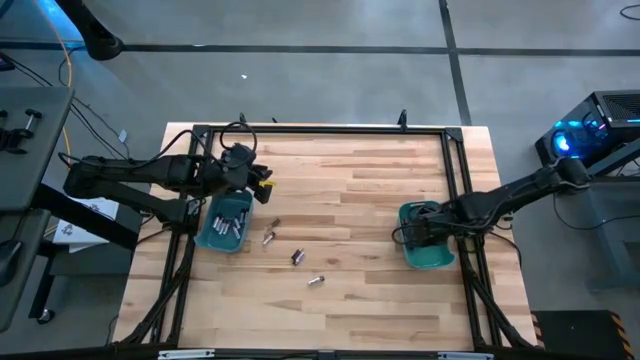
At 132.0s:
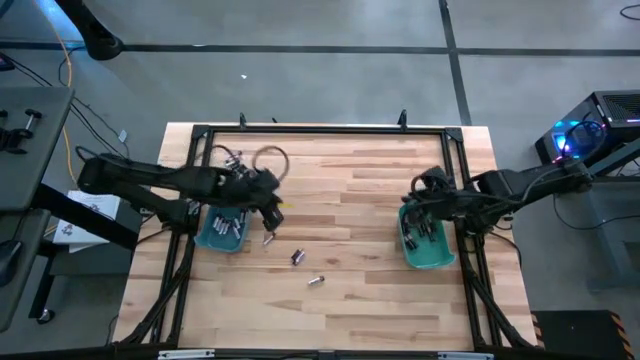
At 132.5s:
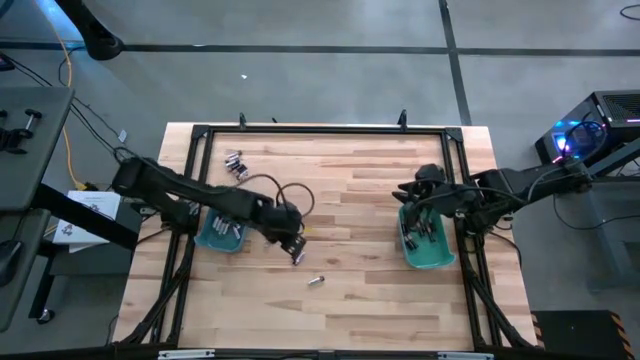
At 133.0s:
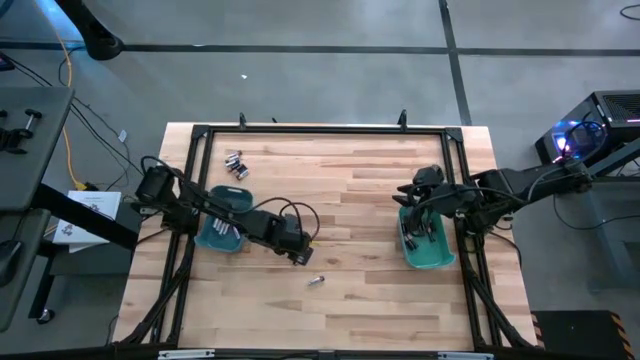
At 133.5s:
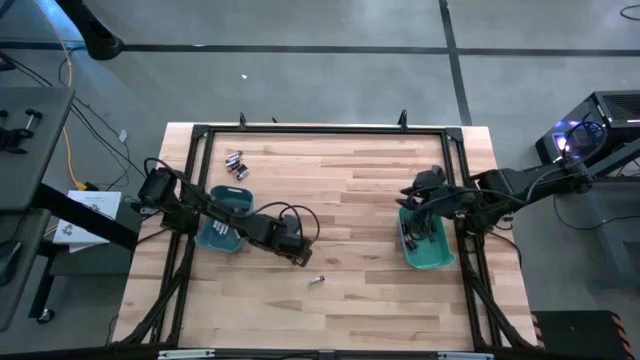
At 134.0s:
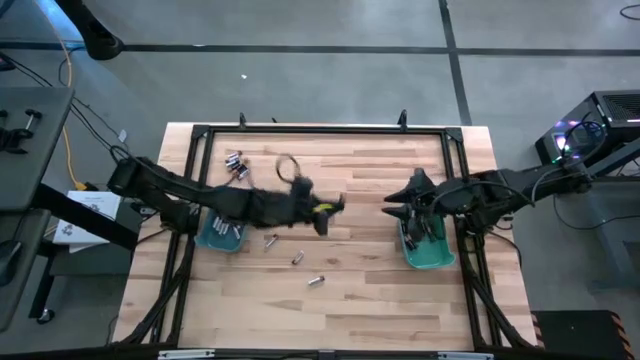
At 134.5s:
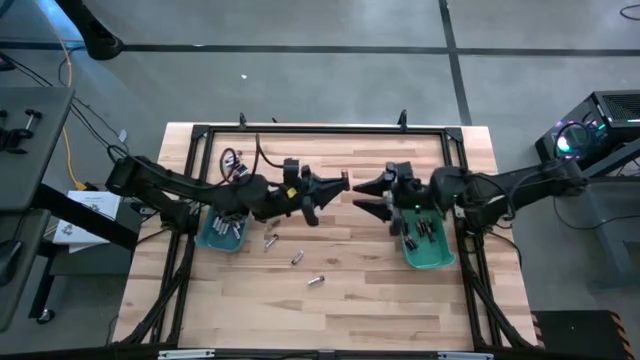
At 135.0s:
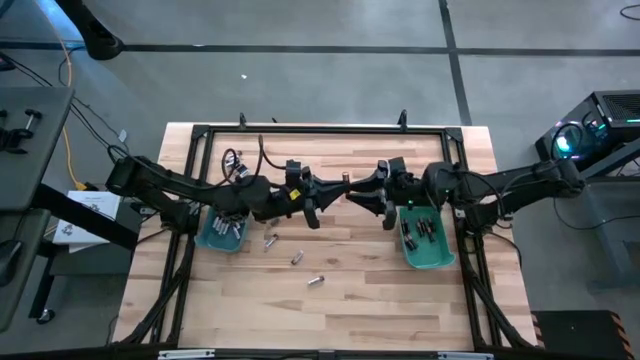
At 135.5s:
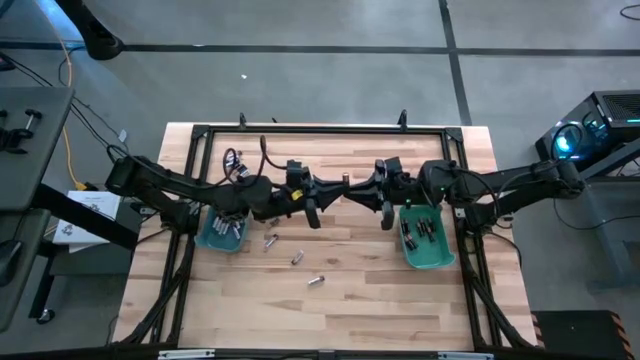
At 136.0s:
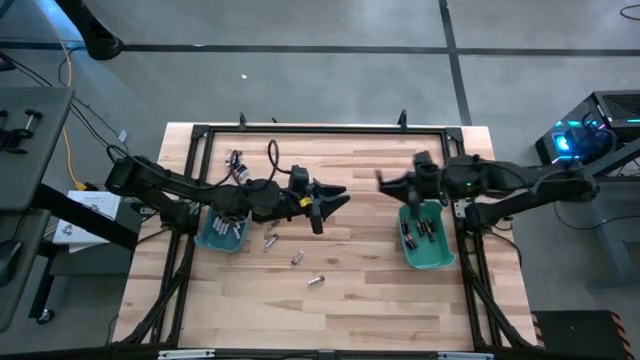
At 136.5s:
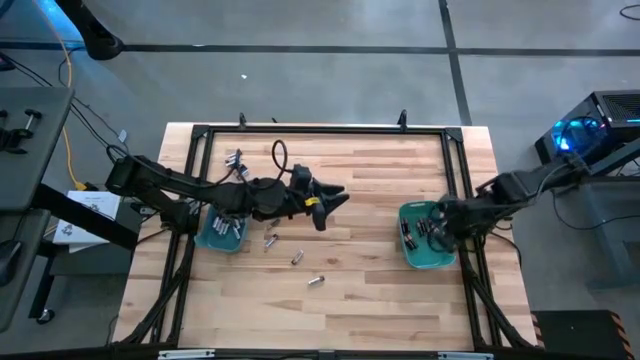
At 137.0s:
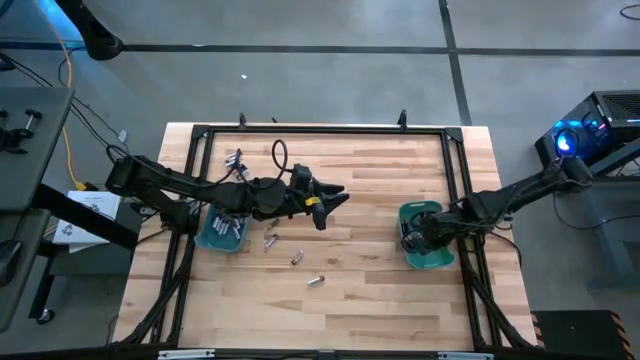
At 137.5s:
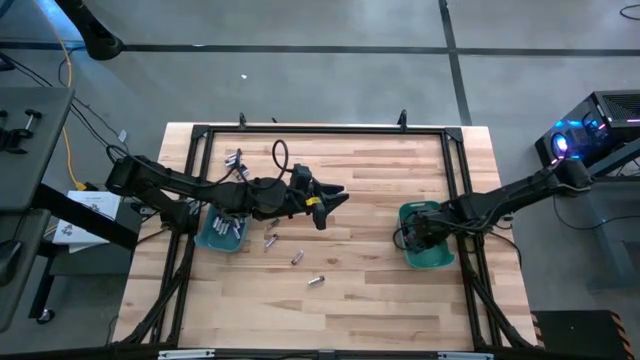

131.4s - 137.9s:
Task: Sort batteries
Put the black battery into the green bin

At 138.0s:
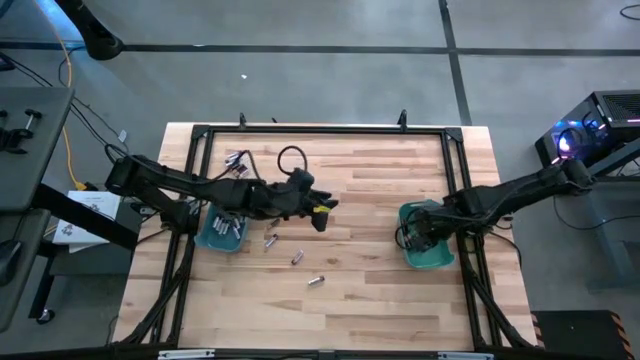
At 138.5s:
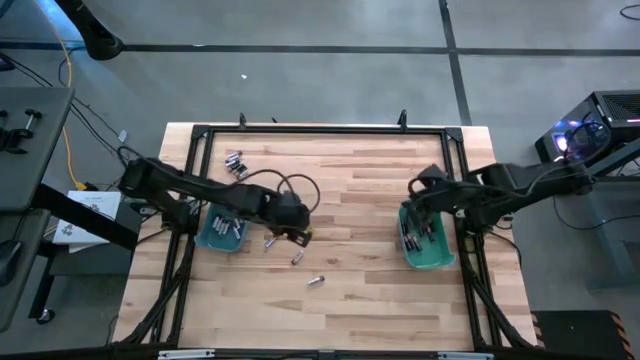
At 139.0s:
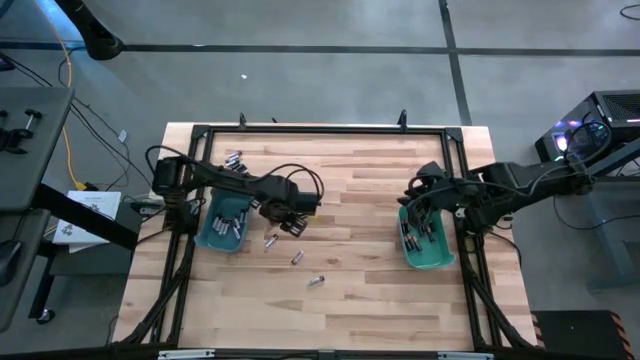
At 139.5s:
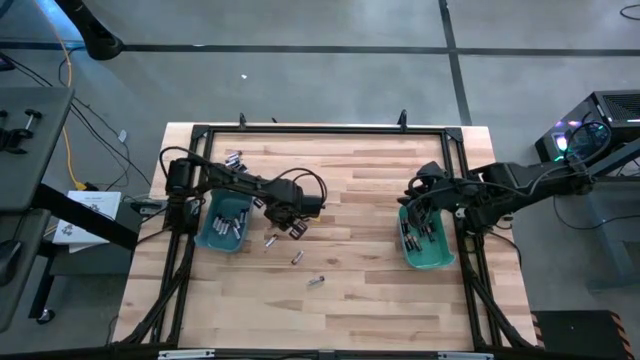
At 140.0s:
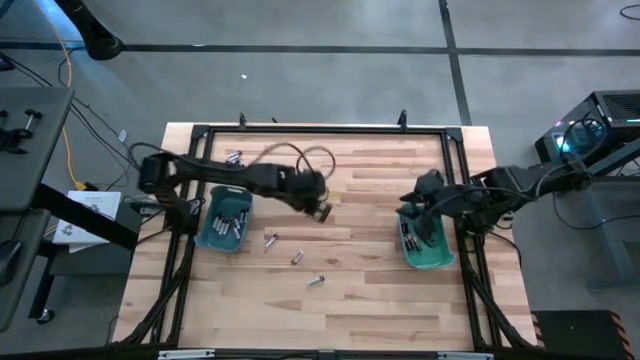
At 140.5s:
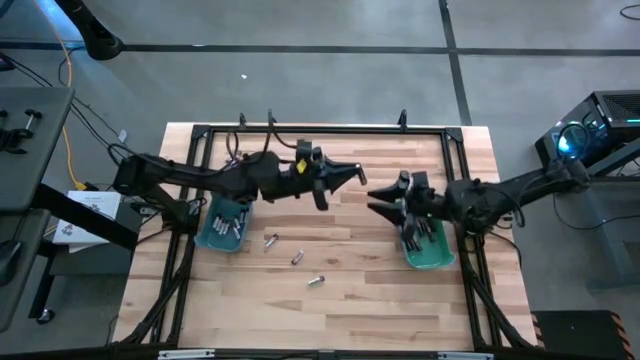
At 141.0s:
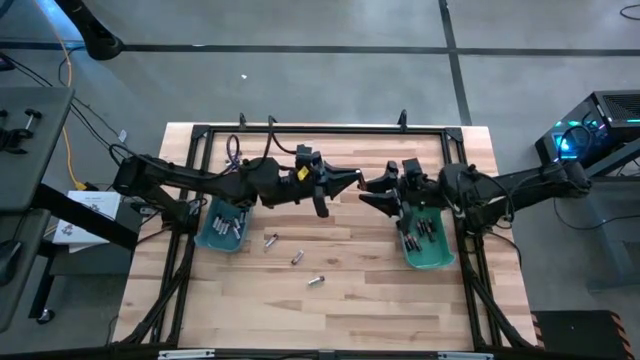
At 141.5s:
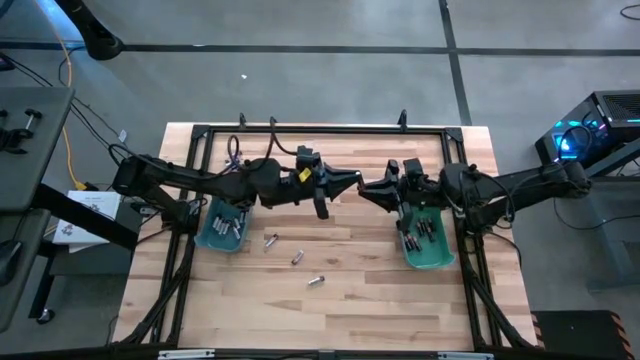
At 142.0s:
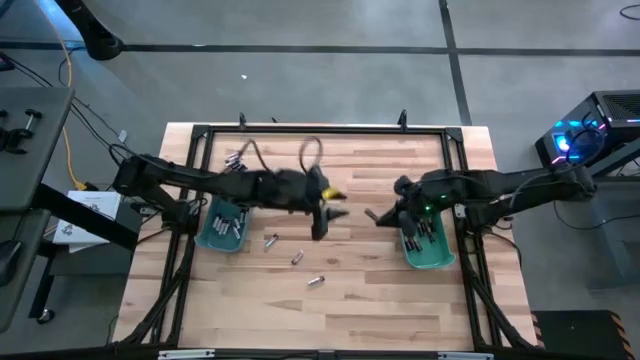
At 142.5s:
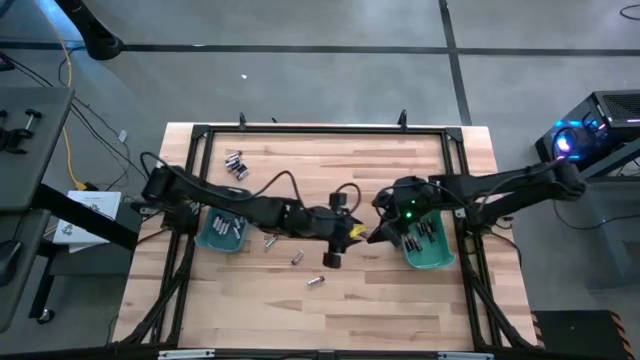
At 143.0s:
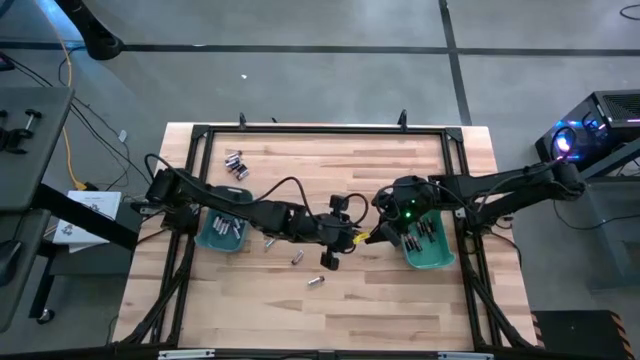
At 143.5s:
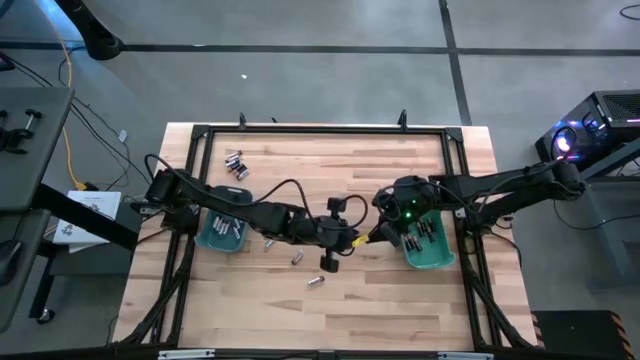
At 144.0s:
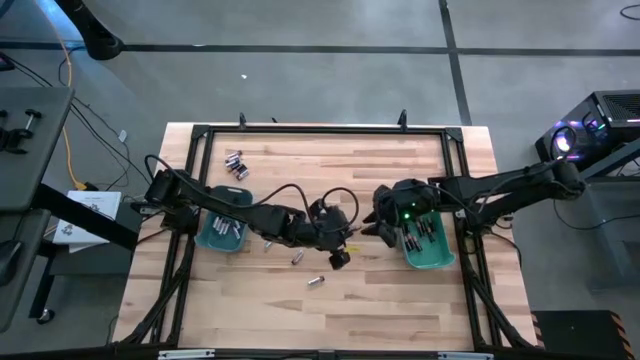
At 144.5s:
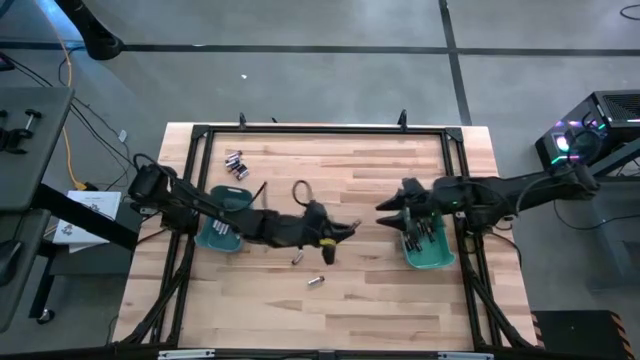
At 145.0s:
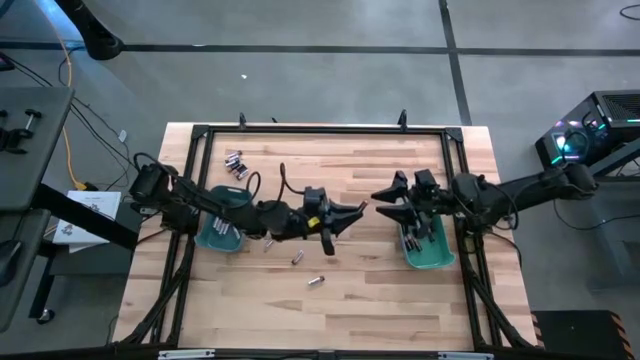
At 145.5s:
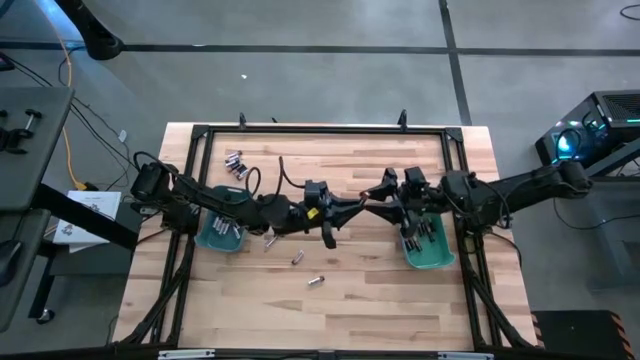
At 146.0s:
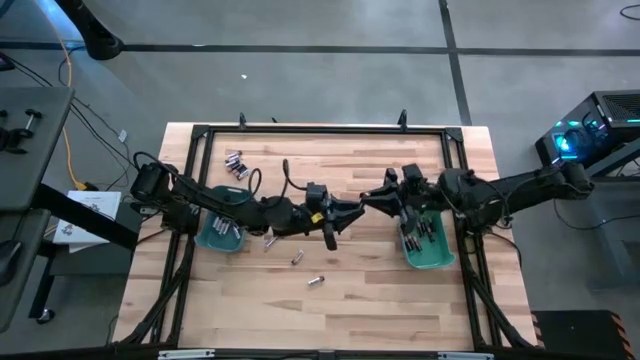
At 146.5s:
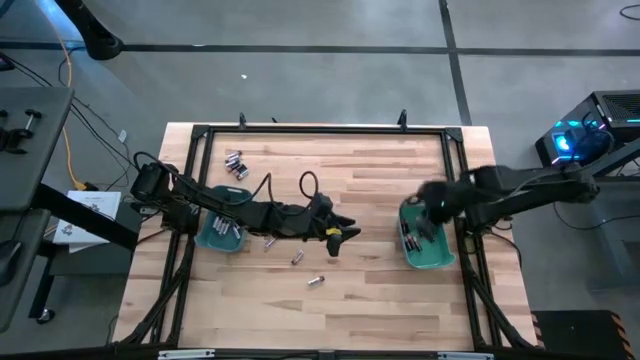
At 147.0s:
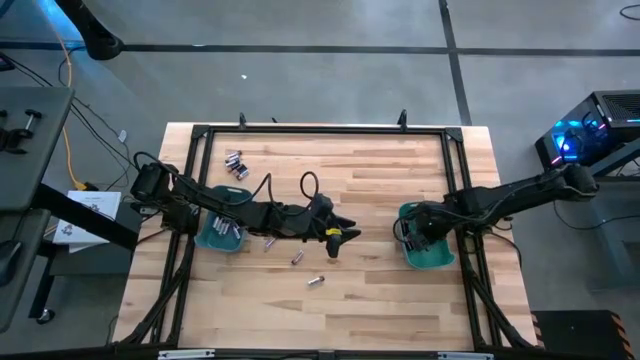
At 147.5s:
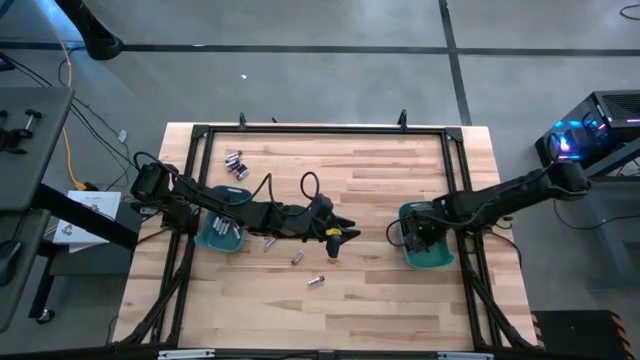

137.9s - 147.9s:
Put the black battery into the green bin

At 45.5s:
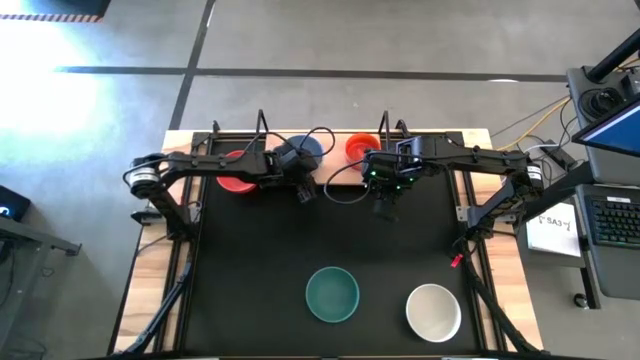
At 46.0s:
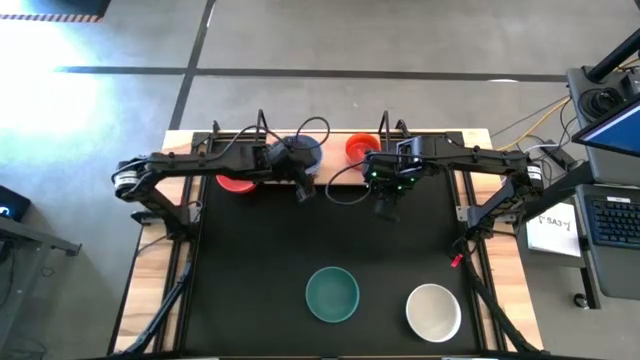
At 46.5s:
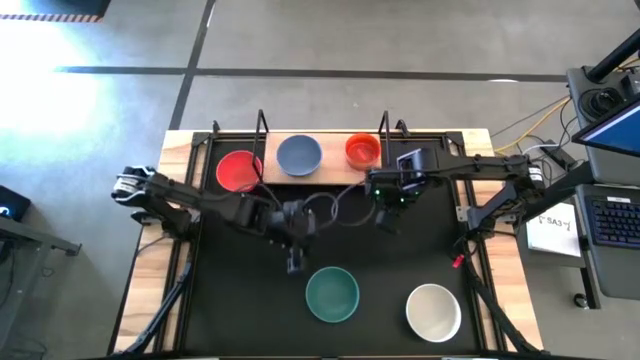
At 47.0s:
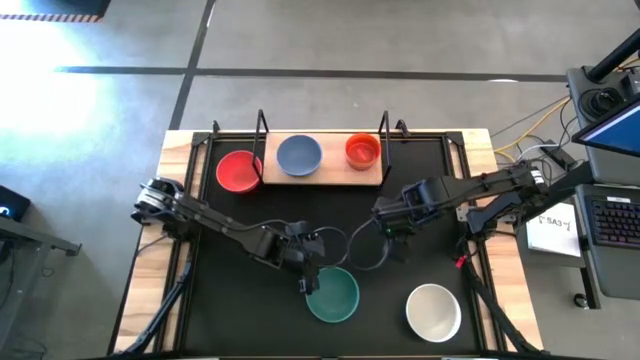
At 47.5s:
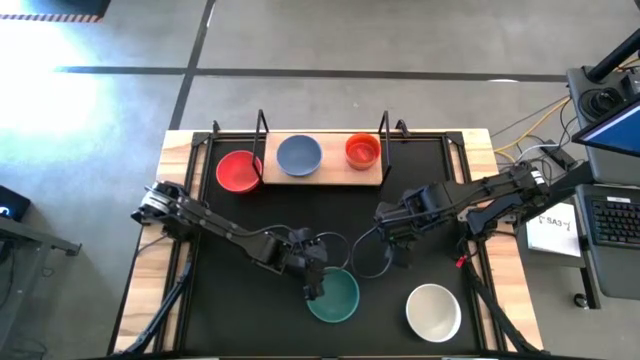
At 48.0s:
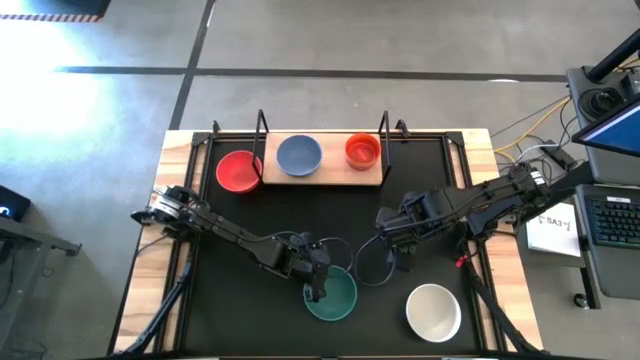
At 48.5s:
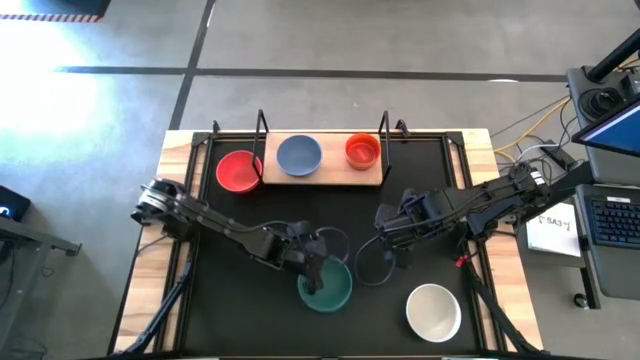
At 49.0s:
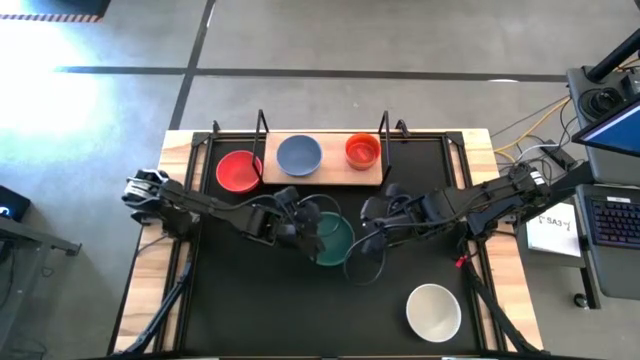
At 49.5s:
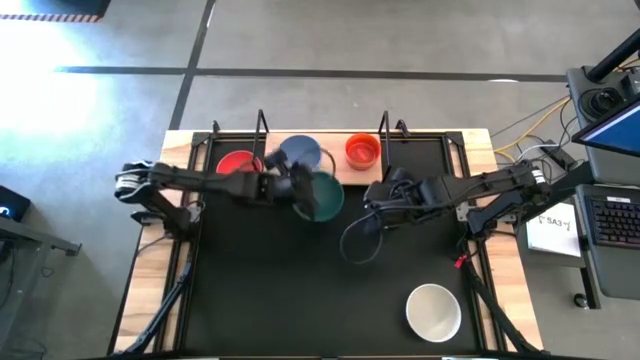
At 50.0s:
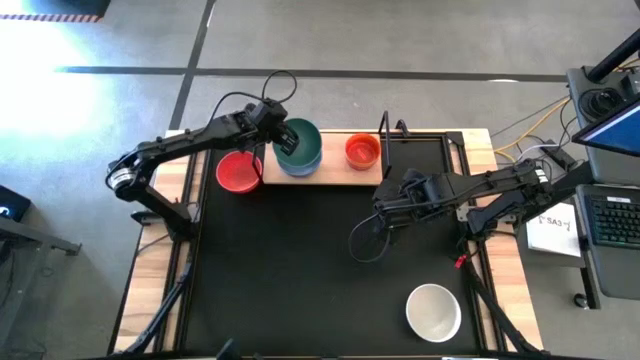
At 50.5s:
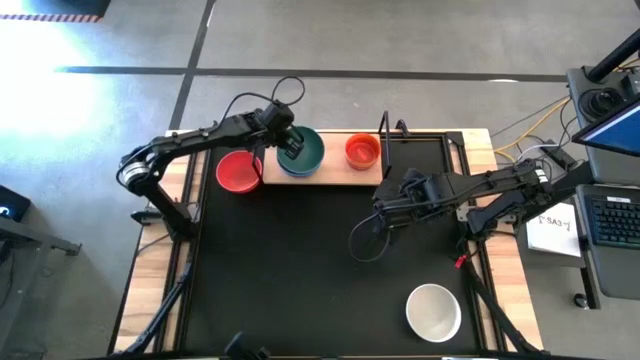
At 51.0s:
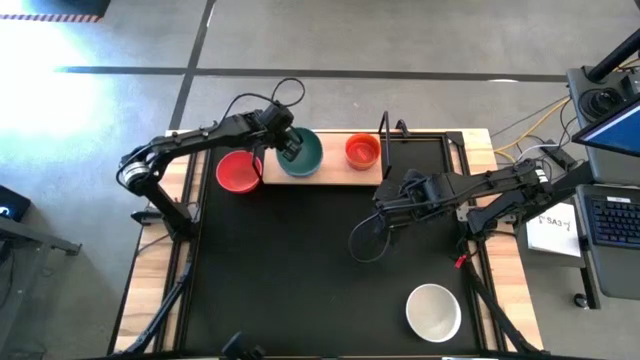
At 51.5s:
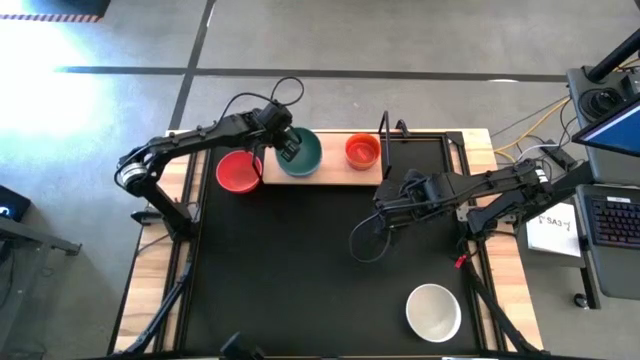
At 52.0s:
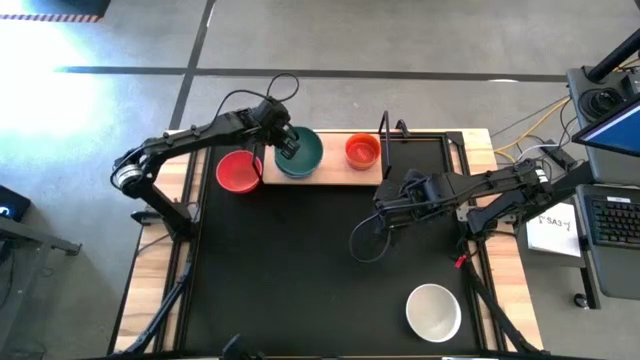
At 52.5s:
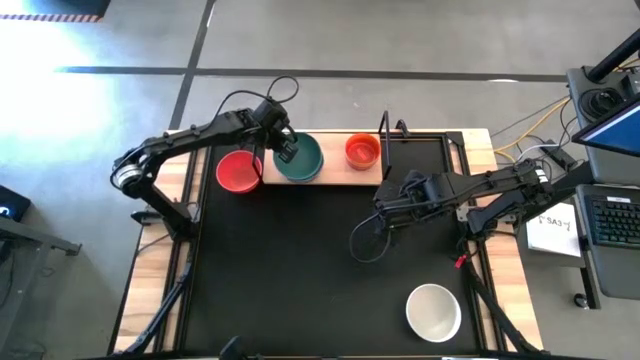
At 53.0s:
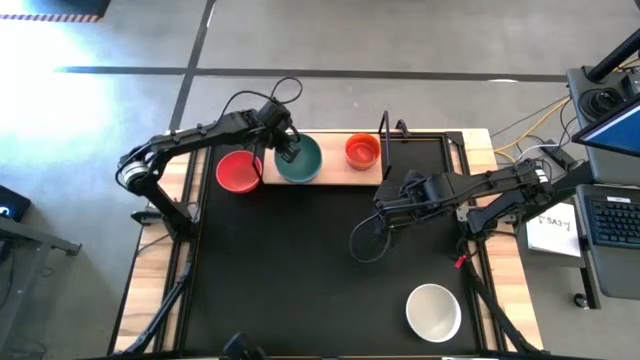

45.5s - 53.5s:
Task: Place and stack bowls onto a shelf
Stack the green bowl on top of the blue bowl on the shelf
